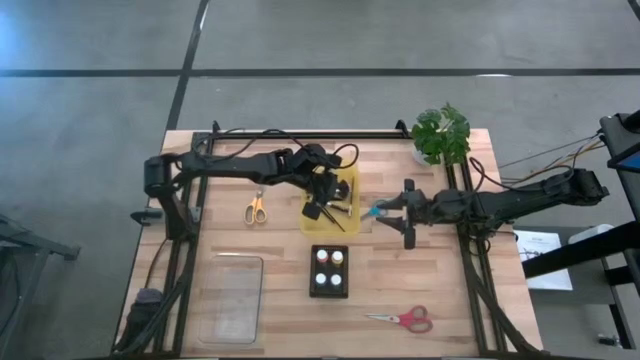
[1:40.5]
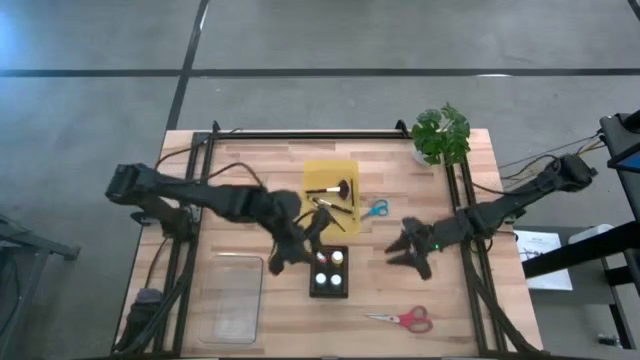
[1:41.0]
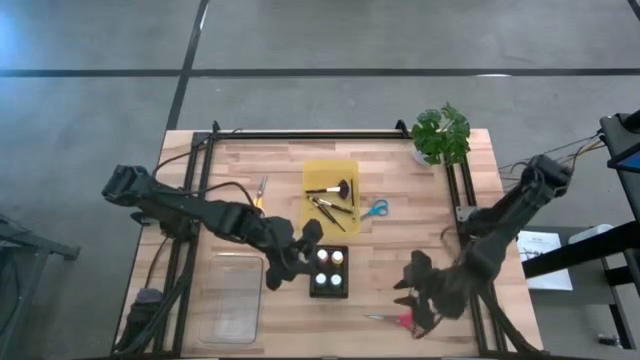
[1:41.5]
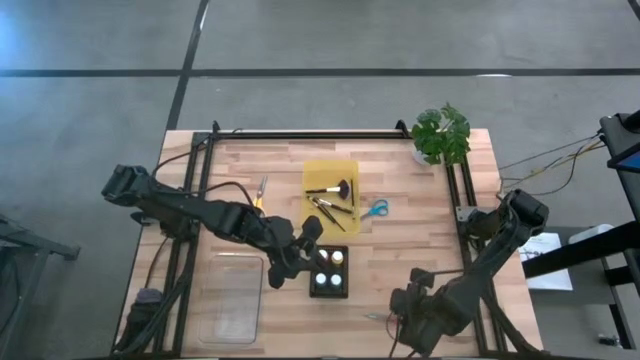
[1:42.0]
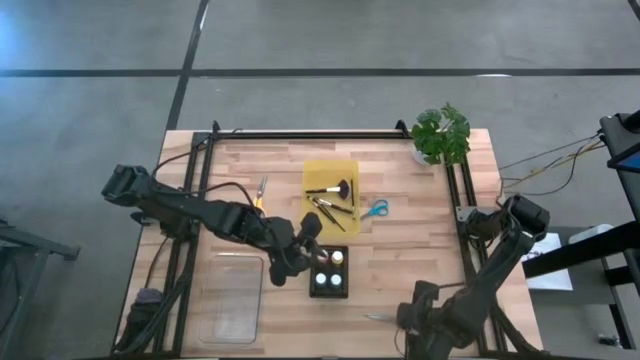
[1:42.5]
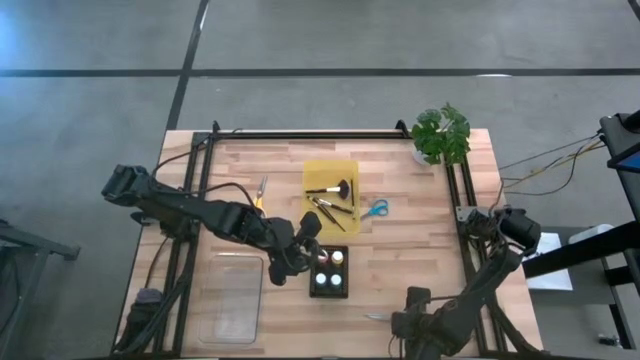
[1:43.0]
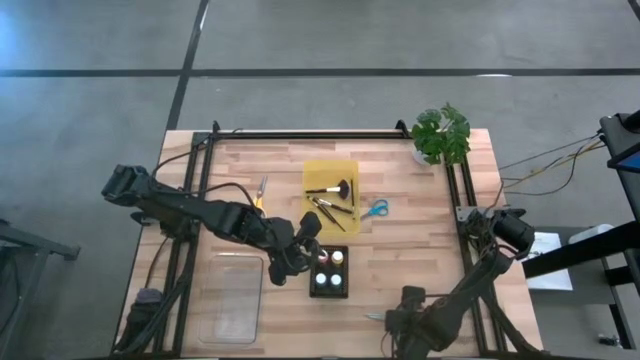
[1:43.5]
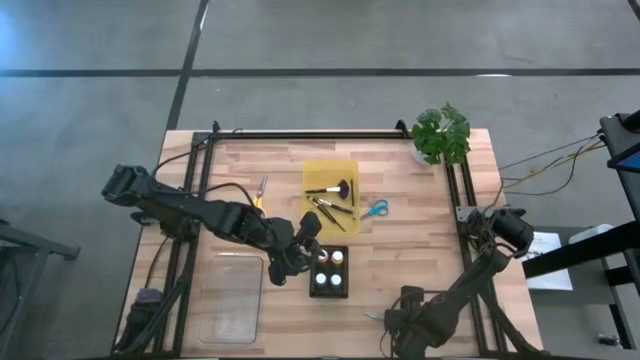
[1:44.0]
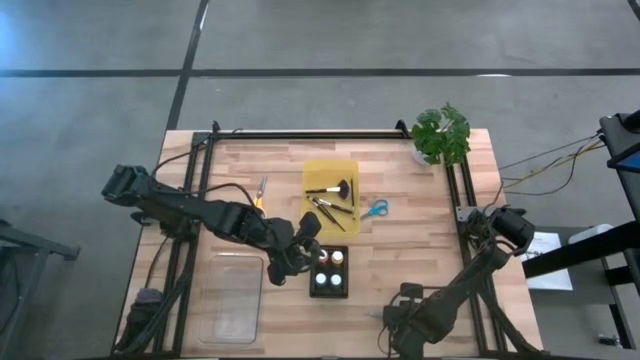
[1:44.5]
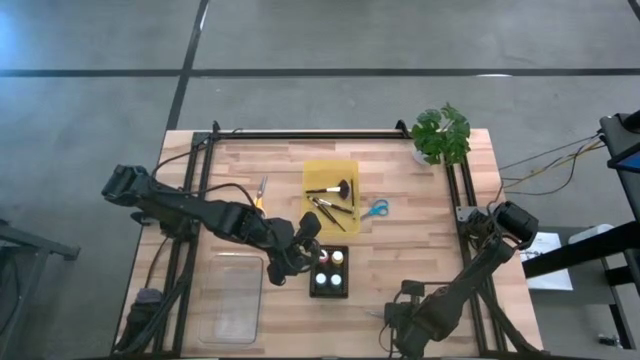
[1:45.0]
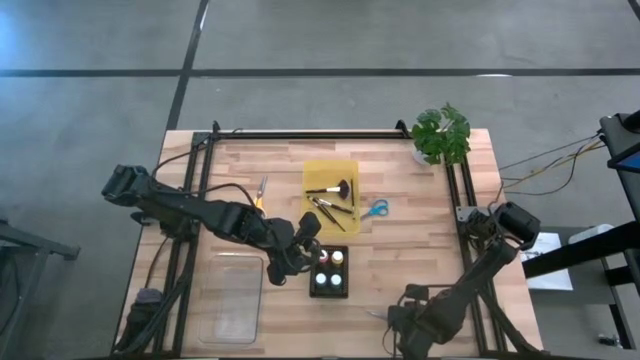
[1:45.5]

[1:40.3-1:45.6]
Task: Pick & Place Paint Supplies
Put the red scissors into the transparent bin

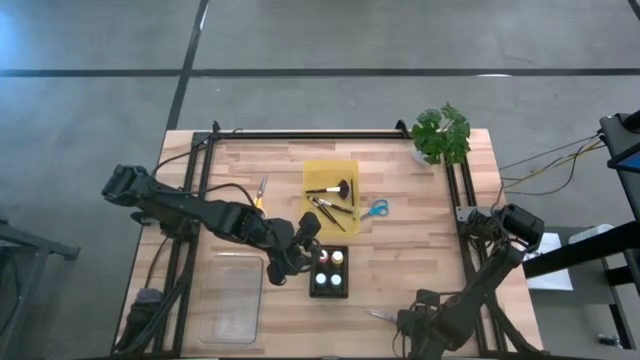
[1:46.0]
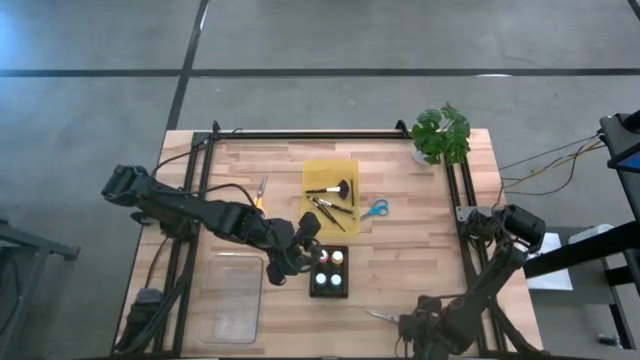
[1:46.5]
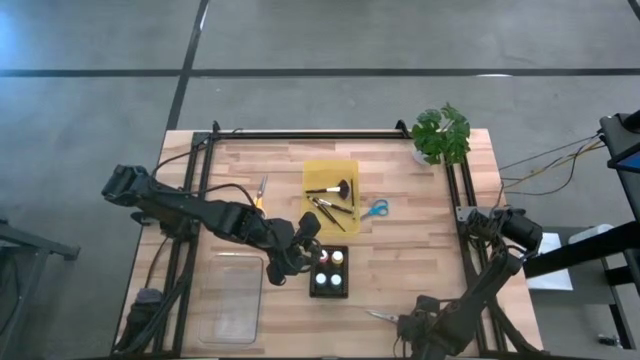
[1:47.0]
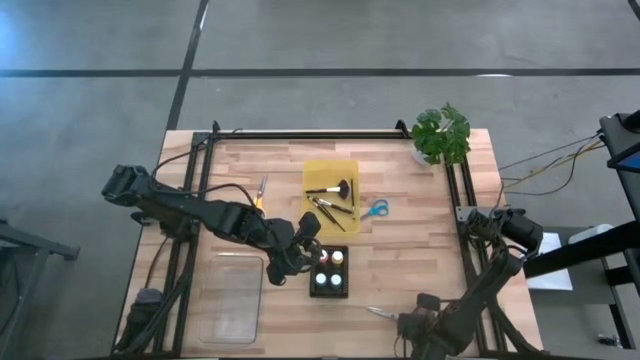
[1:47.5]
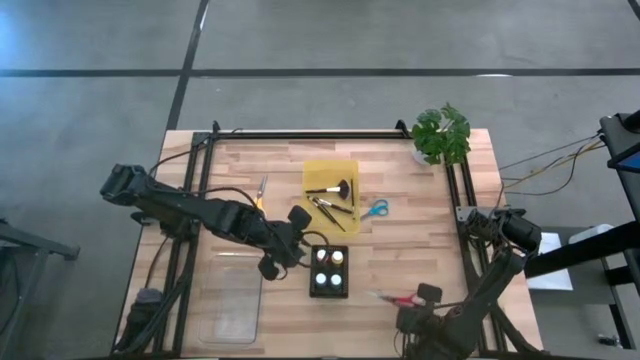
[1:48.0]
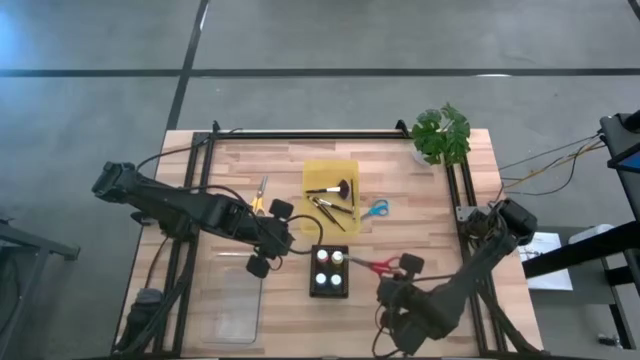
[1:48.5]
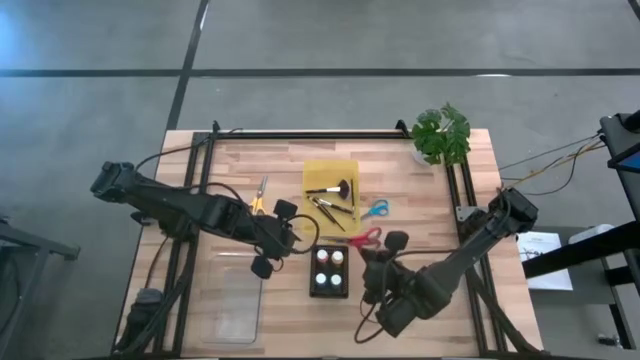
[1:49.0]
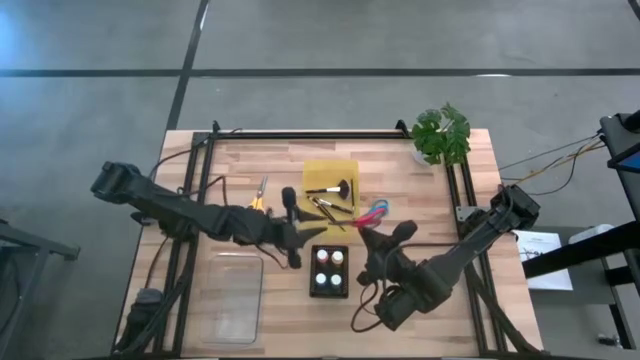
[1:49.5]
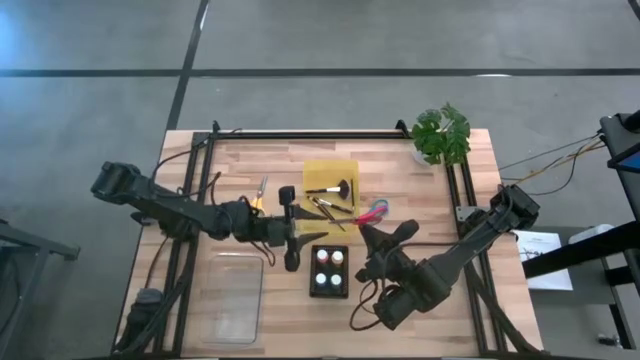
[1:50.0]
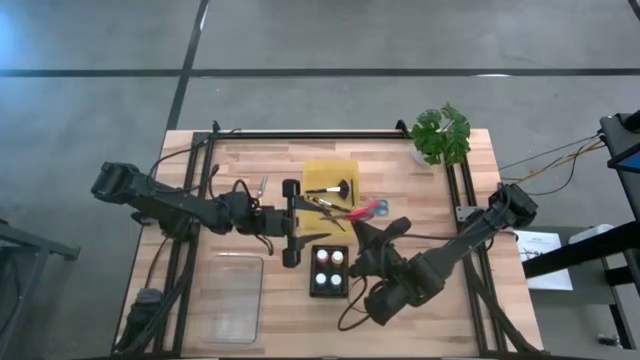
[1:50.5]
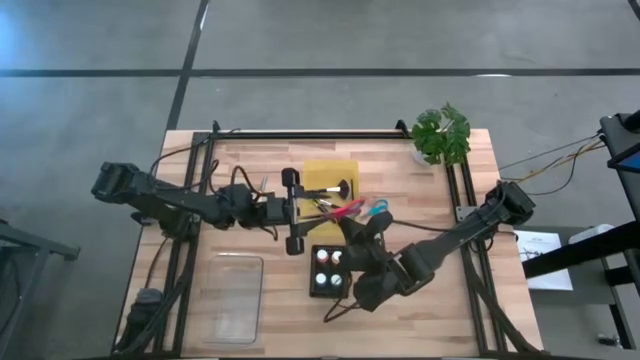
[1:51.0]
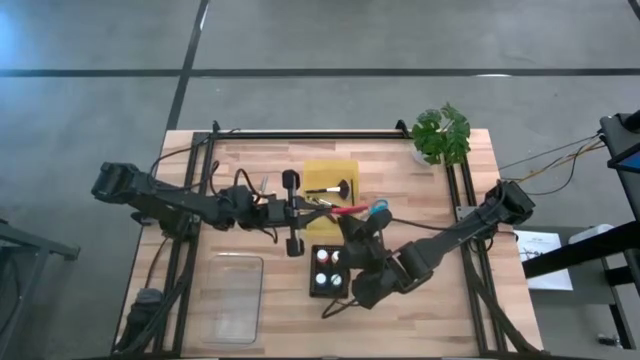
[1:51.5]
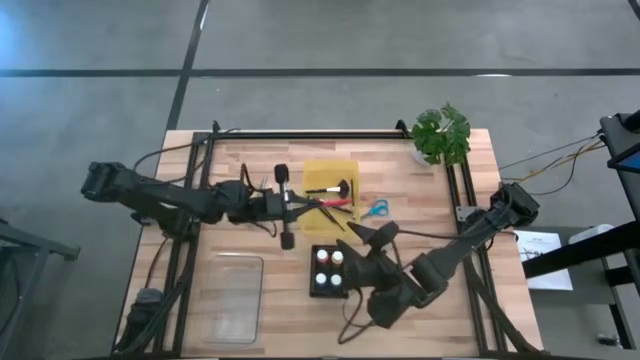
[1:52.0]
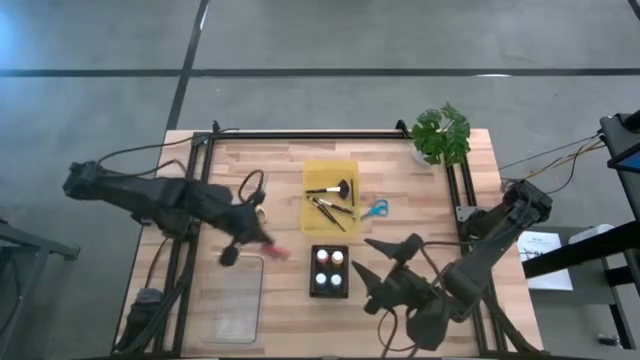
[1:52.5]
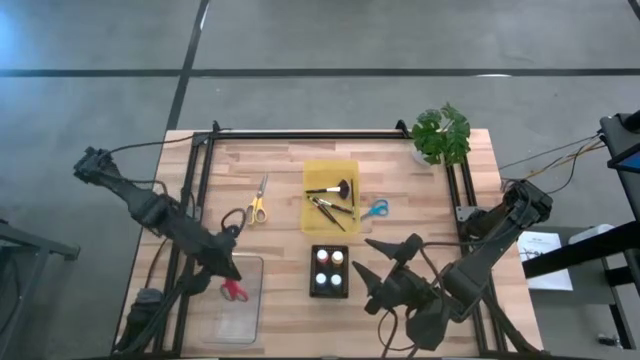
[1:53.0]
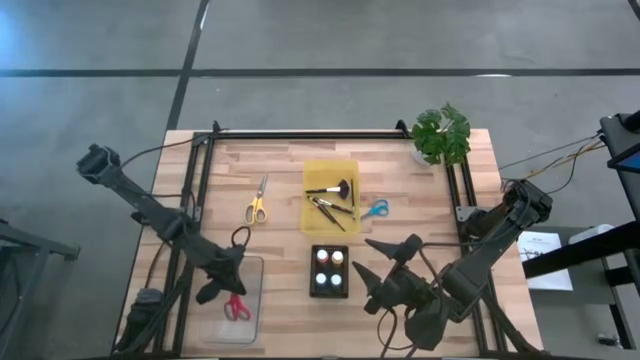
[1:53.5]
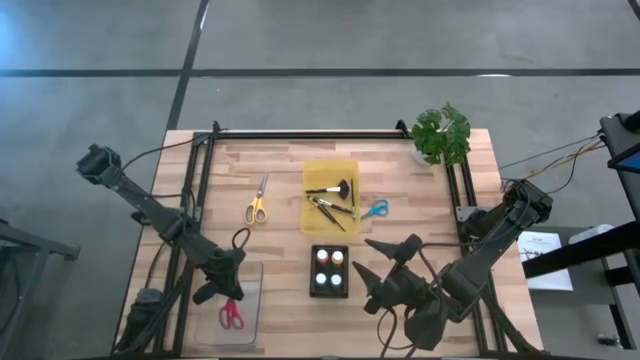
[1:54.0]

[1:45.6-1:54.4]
Put the red scissors into the transparent bin

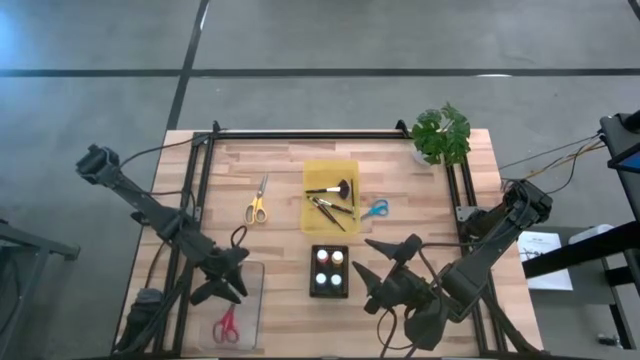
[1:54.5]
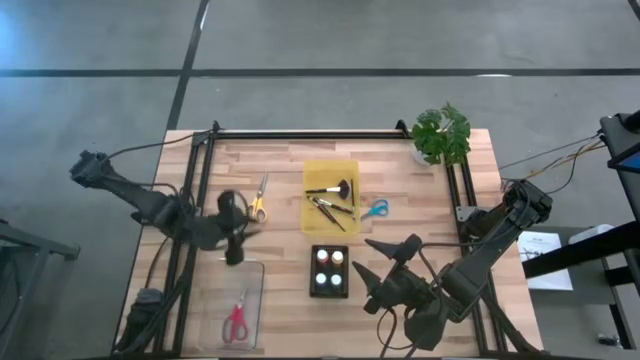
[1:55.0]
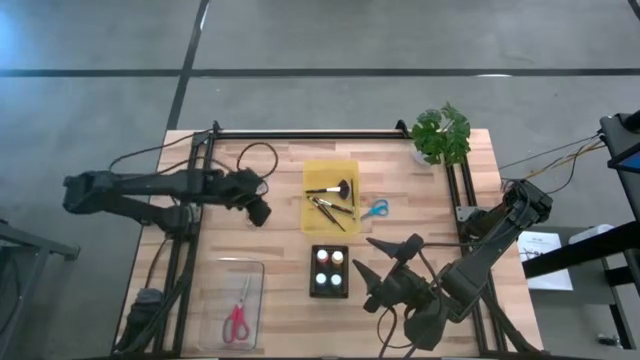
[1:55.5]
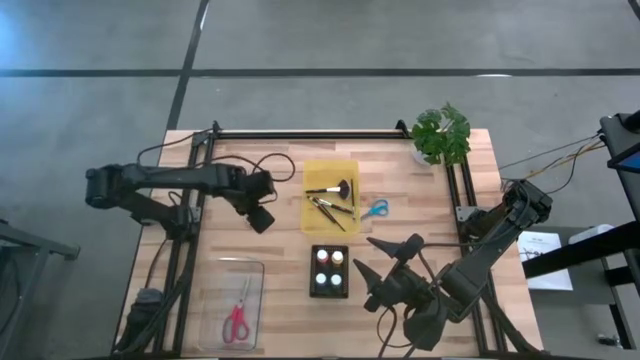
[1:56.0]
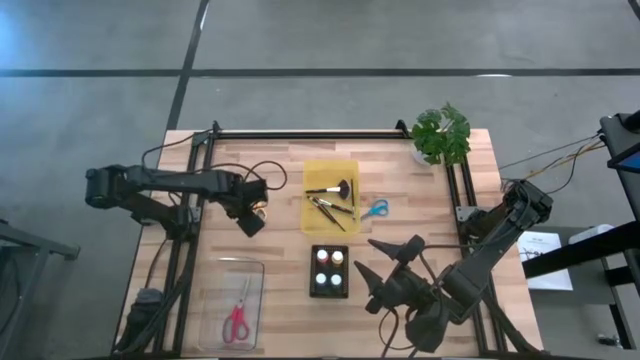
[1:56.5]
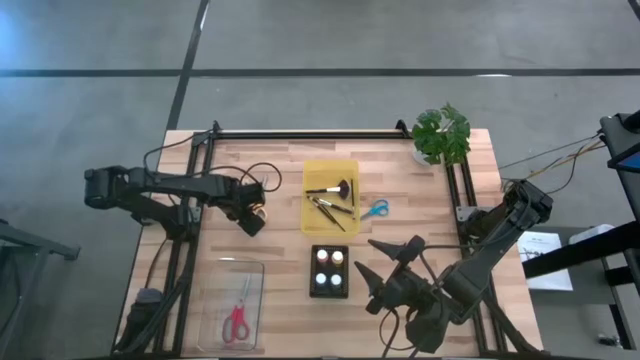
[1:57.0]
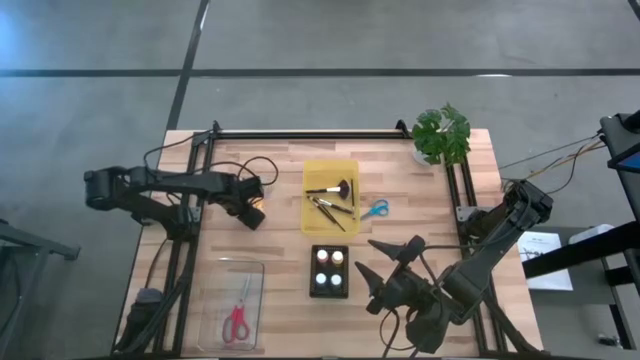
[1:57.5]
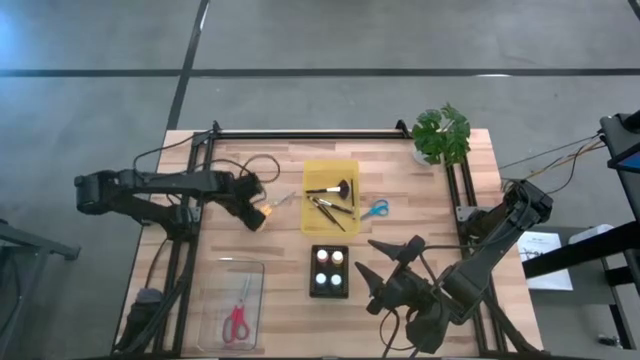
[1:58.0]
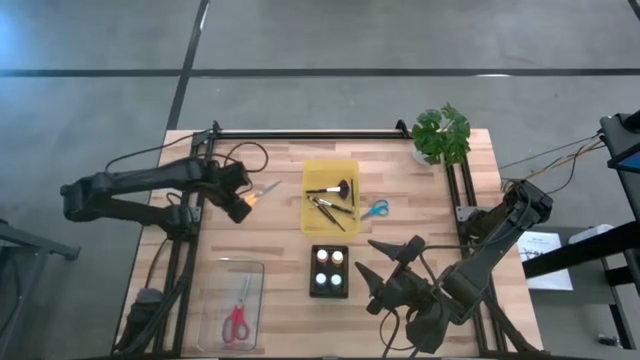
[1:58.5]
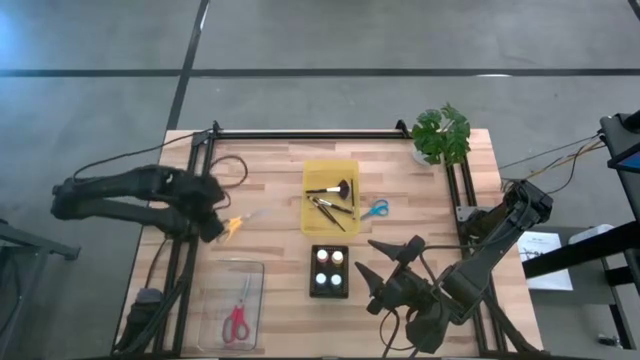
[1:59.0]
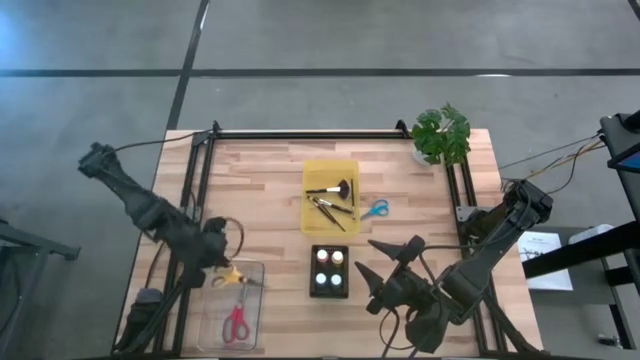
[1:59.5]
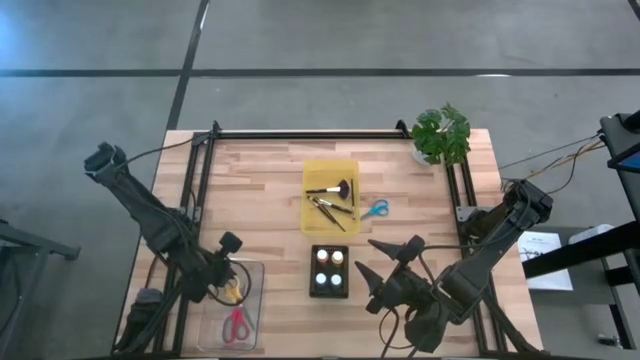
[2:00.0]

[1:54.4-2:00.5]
Put the yellow scissors into the transparent bin
